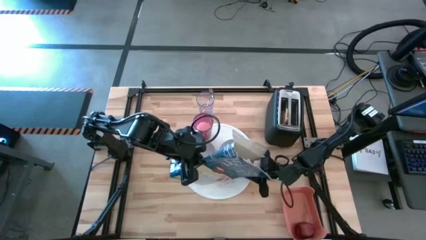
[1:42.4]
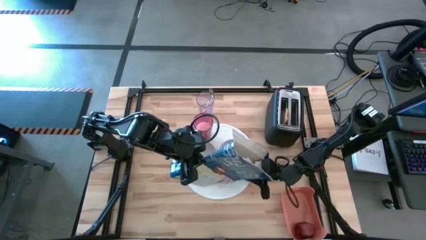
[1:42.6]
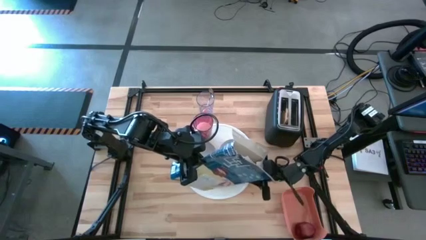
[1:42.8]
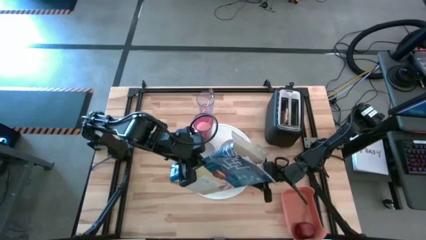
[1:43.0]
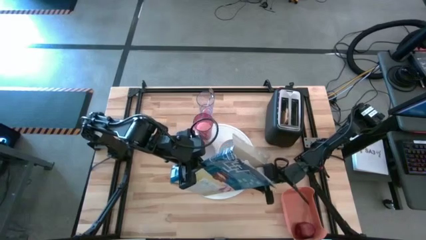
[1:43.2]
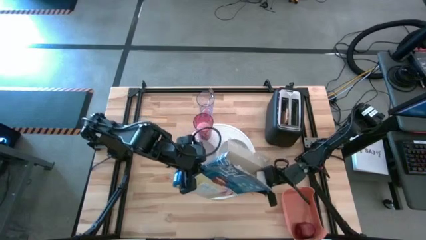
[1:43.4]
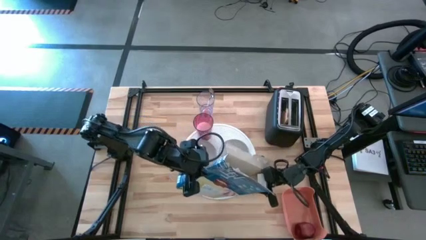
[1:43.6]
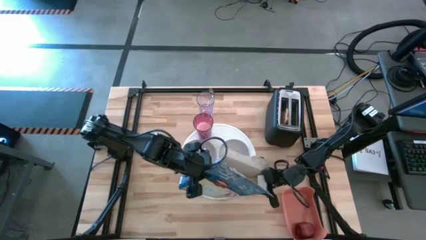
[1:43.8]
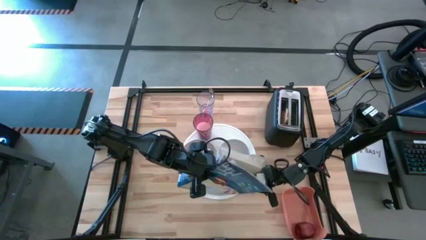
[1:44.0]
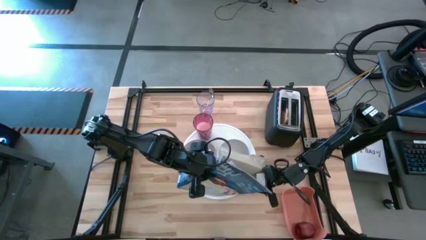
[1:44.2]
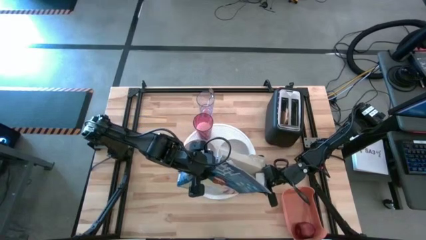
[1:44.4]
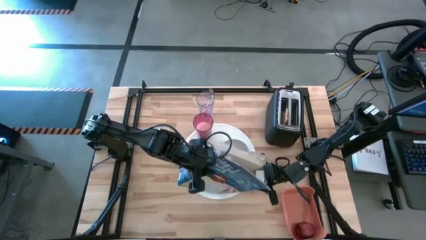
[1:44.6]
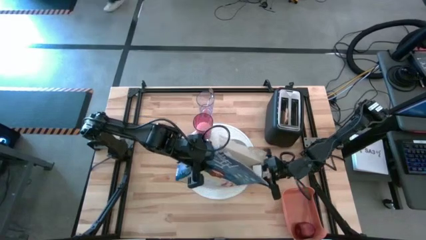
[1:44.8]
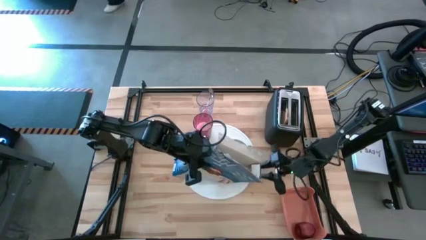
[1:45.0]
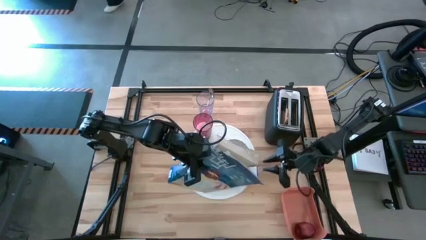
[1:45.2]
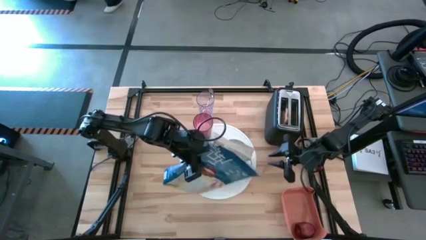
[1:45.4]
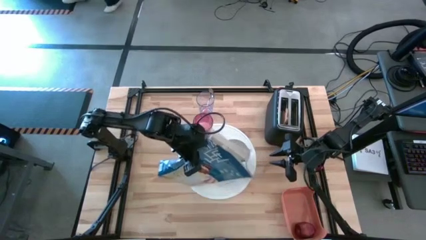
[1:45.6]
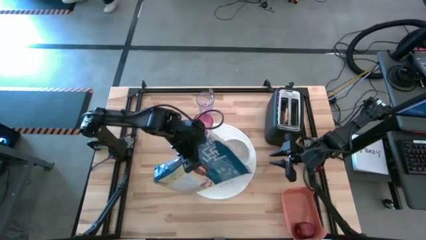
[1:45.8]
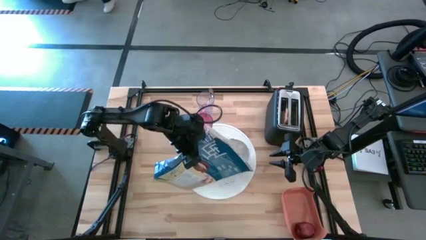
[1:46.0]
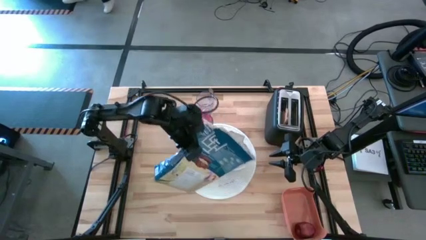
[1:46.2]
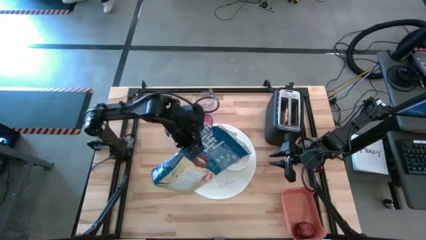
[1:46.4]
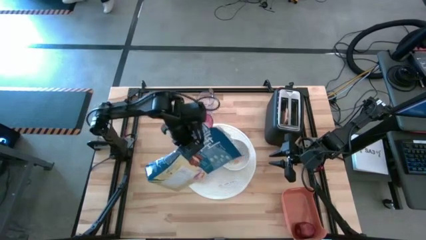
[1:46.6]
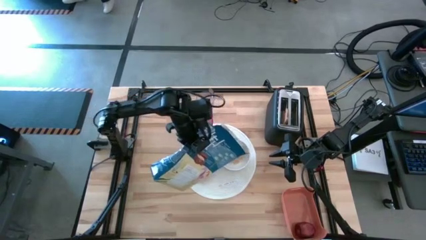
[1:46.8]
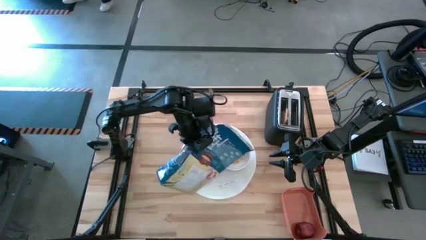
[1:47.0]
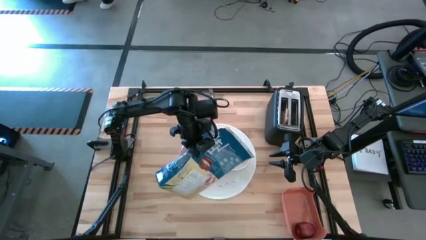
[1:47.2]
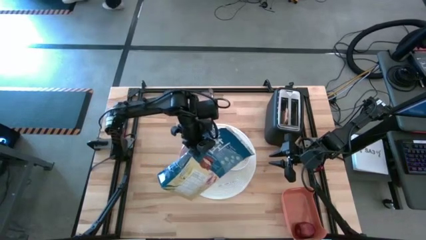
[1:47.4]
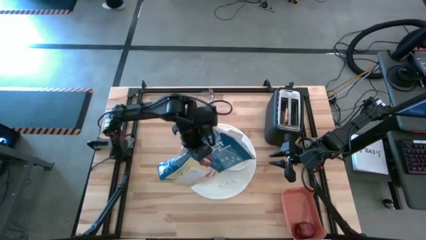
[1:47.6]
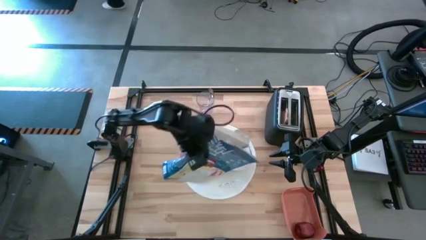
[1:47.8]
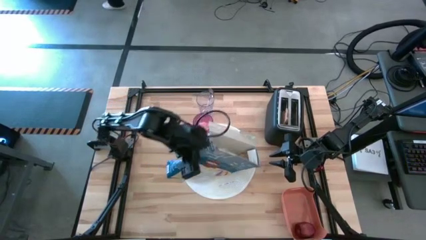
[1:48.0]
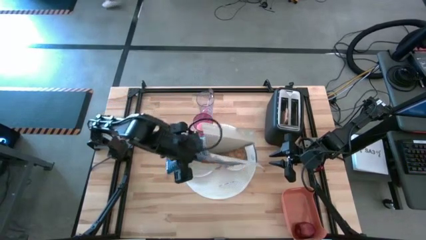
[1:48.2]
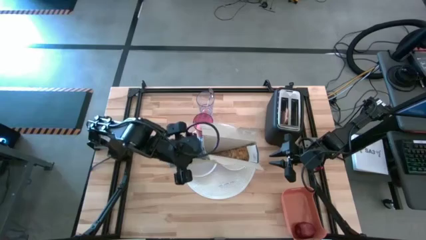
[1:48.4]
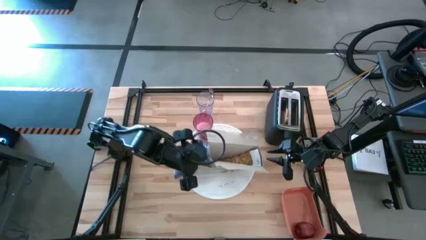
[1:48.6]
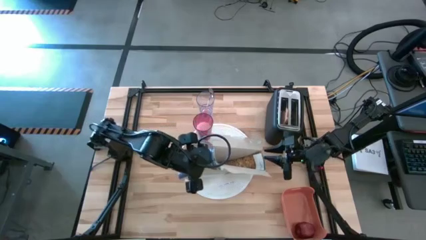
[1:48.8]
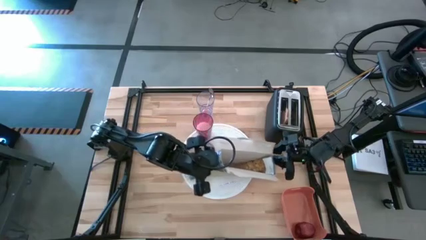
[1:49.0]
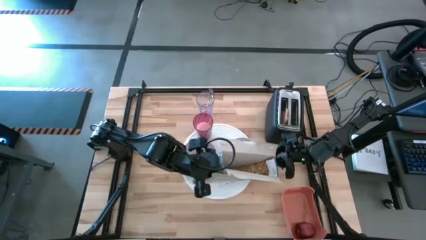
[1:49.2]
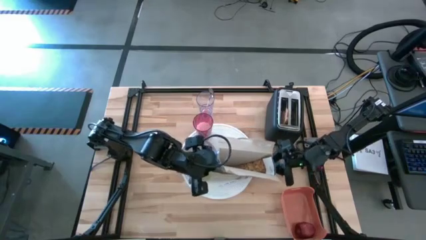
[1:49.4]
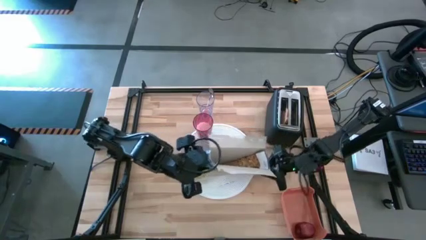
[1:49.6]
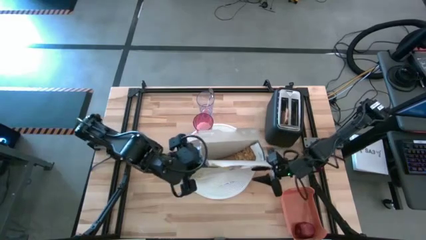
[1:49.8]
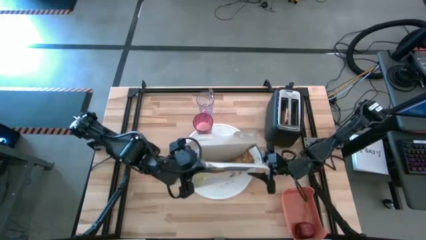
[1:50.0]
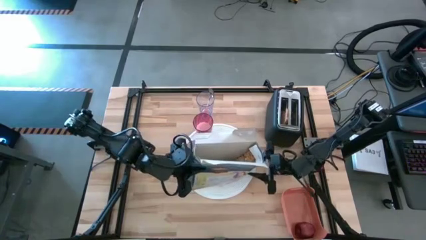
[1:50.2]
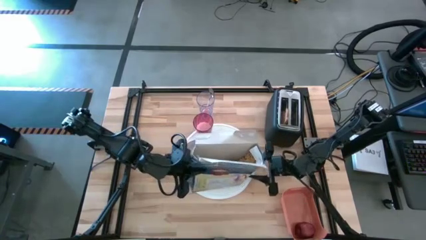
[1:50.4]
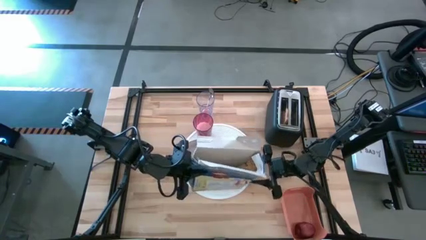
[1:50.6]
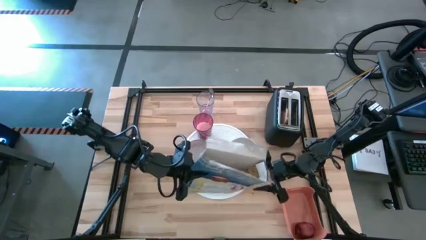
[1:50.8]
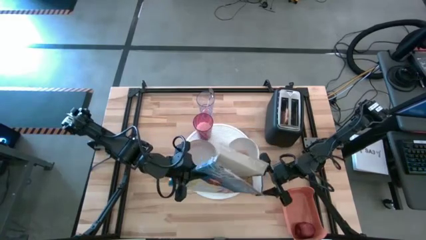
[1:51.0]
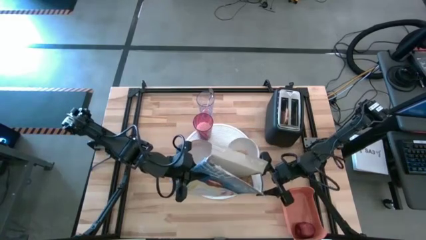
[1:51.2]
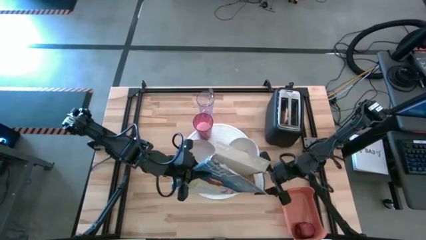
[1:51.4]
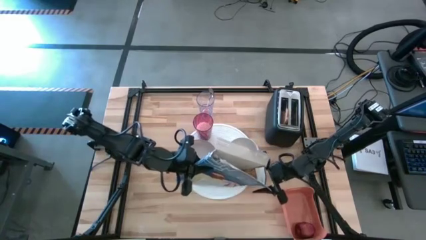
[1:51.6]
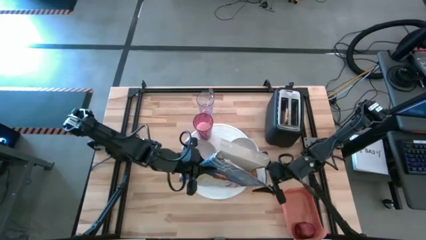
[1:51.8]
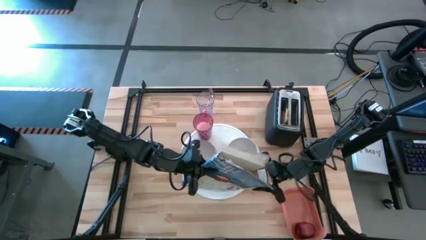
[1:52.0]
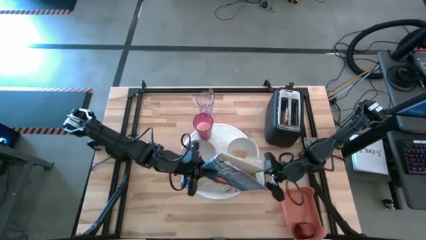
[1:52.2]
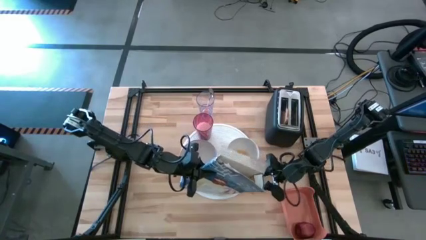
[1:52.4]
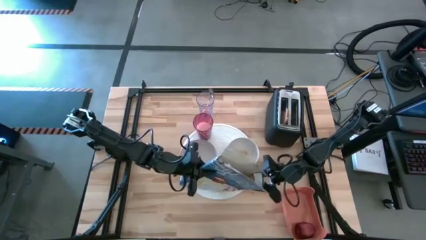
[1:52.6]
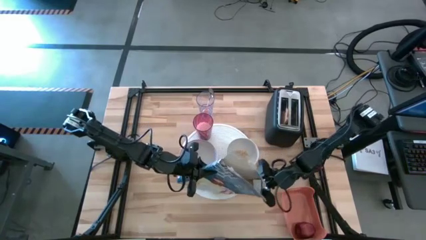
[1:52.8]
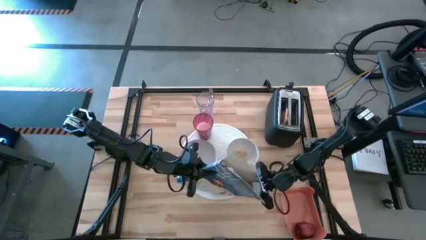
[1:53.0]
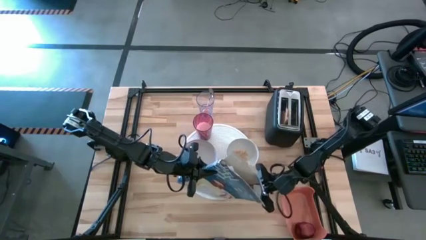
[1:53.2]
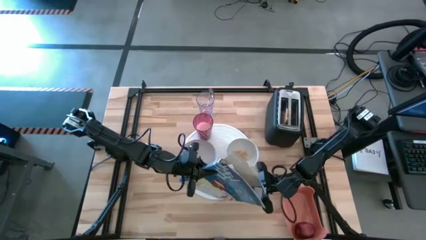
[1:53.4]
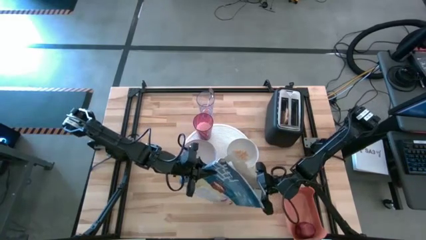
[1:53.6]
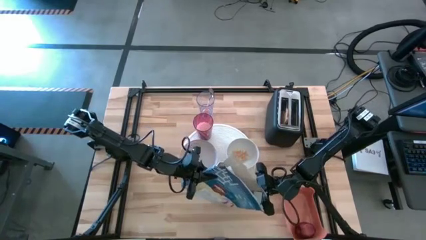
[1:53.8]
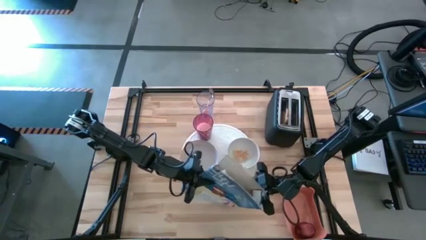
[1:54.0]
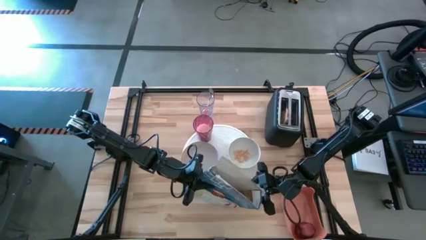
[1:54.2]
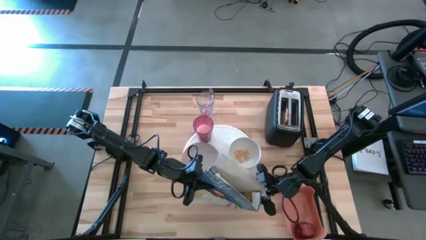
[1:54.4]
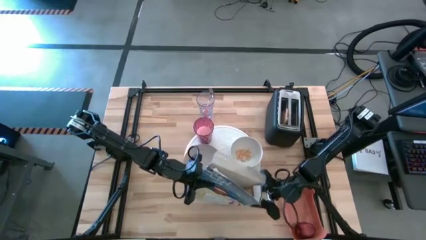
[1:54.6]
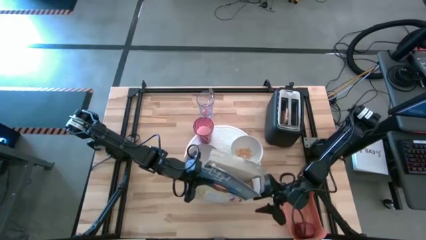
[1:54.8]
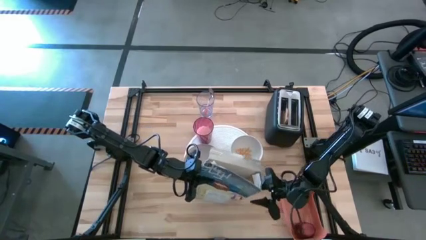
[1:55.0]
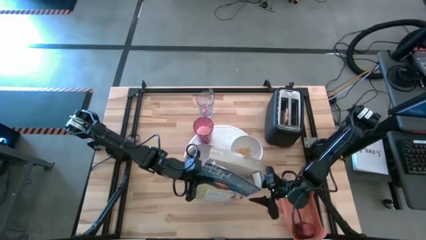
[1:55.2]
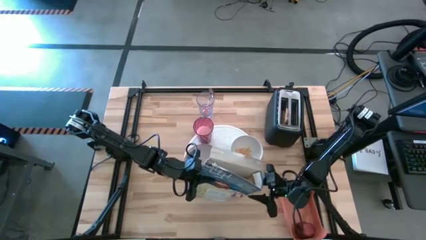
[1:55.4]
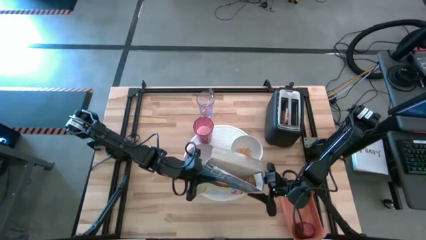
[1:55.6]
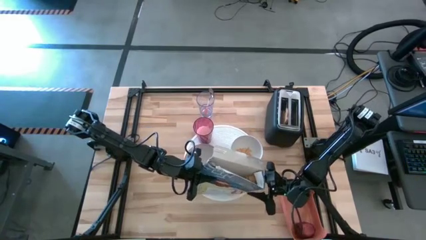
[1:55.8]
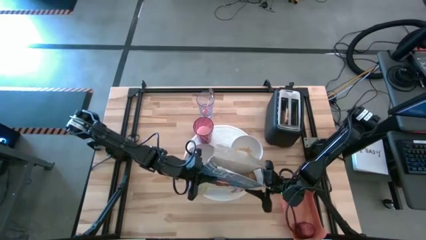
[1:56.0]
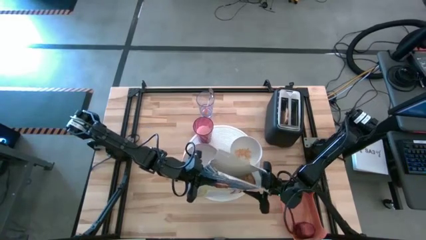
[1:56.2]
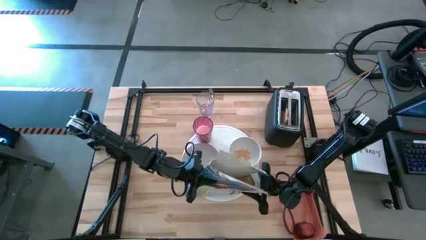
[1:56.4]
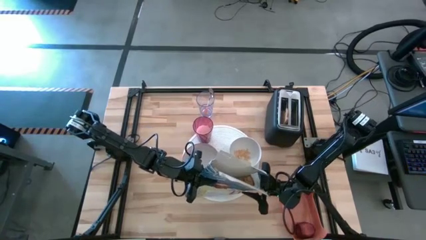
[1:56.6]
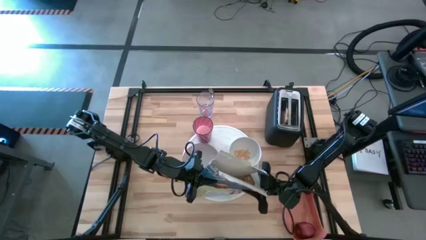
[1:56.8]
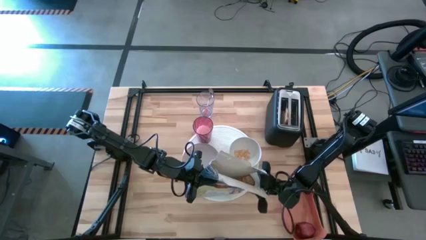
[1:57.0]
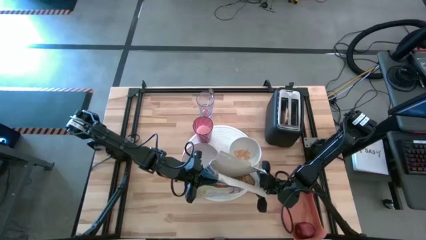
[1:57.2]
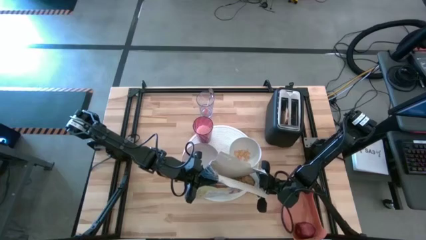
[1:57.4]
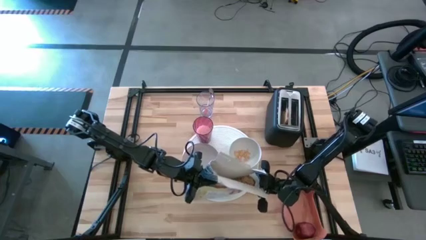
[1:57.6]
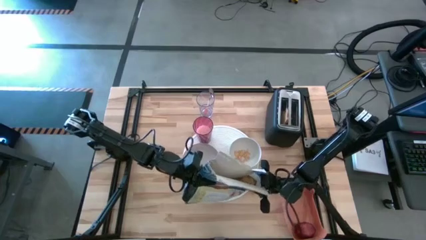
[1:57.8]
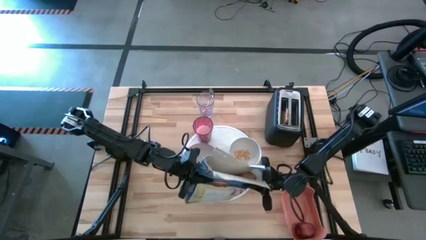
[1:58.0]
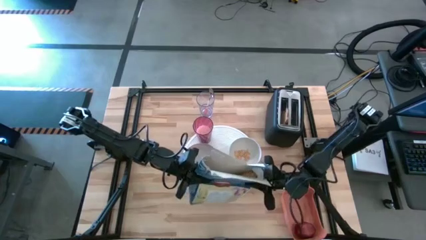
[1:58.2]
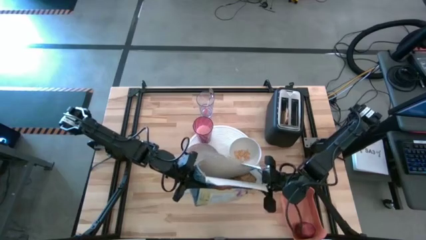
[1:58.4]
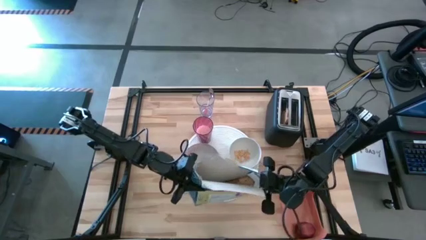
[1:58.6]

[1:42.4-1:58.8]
Task: Arrange a breakfast setting
Pour the cereal from the cereal box into the white bowl
